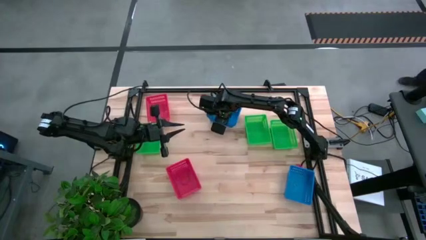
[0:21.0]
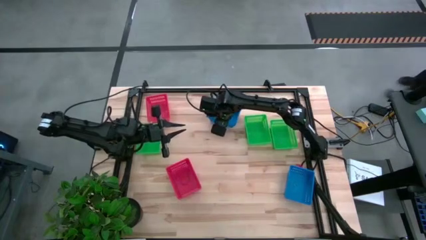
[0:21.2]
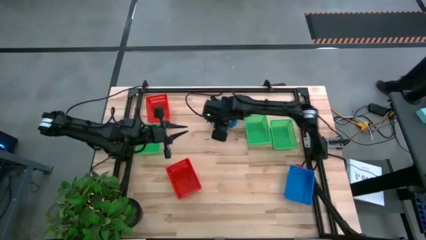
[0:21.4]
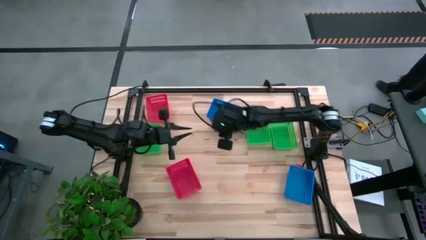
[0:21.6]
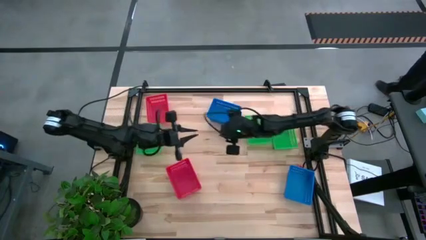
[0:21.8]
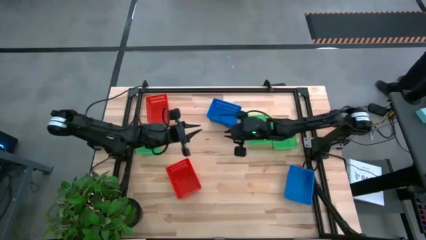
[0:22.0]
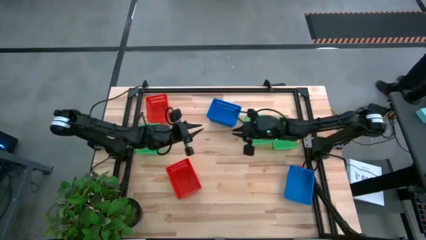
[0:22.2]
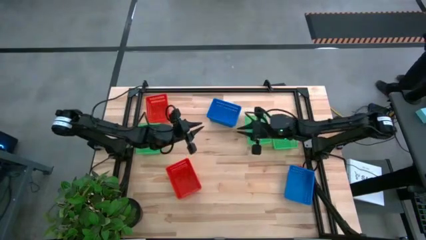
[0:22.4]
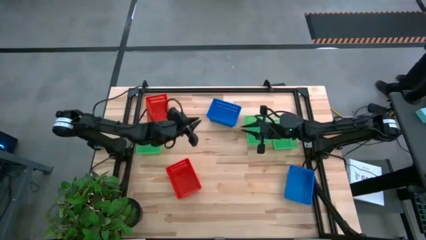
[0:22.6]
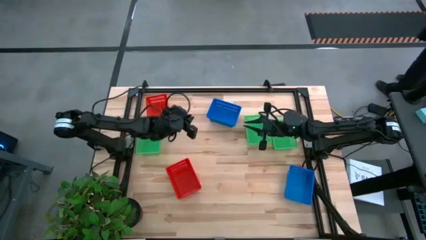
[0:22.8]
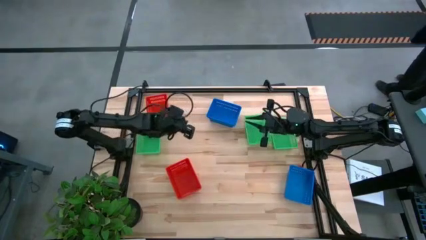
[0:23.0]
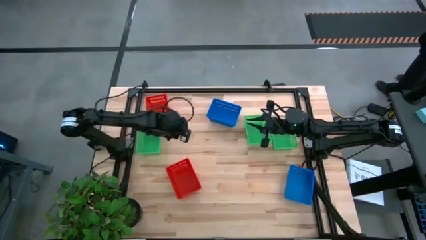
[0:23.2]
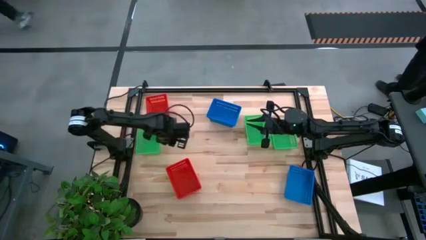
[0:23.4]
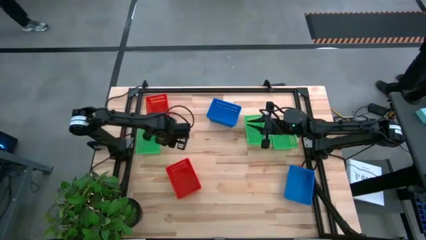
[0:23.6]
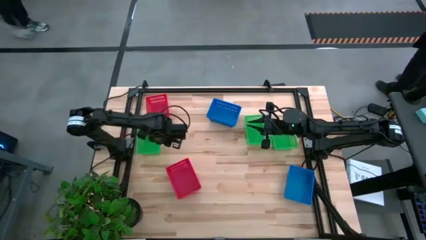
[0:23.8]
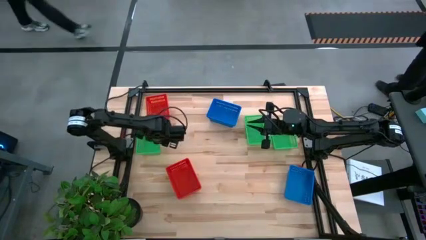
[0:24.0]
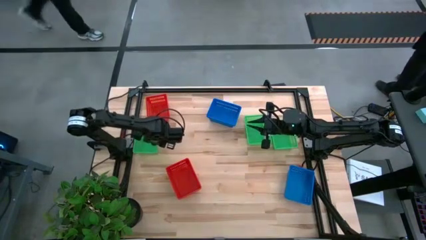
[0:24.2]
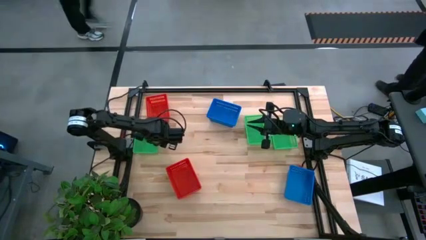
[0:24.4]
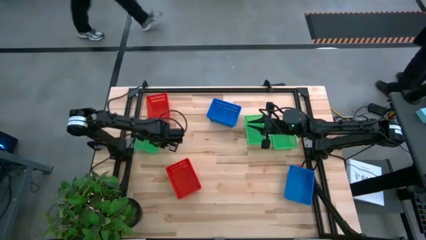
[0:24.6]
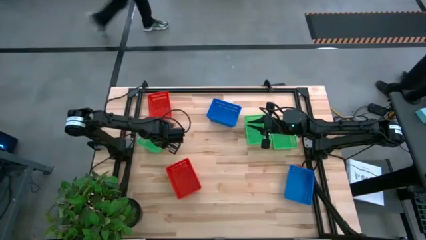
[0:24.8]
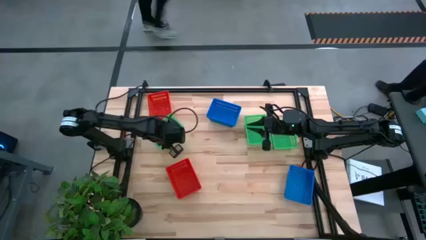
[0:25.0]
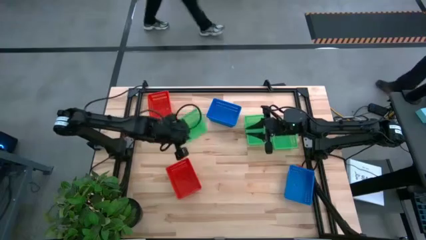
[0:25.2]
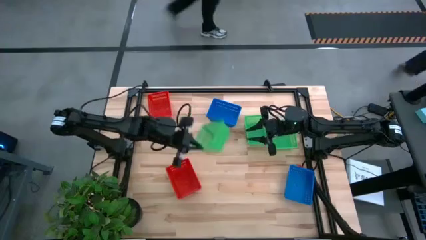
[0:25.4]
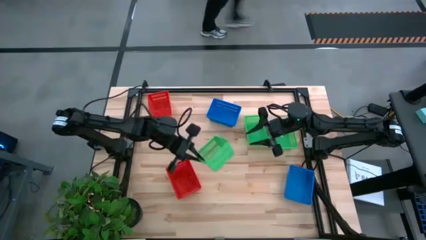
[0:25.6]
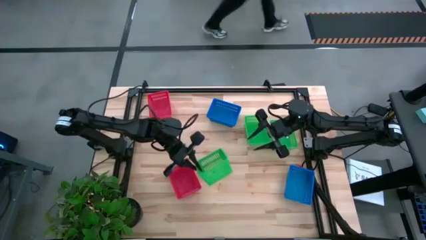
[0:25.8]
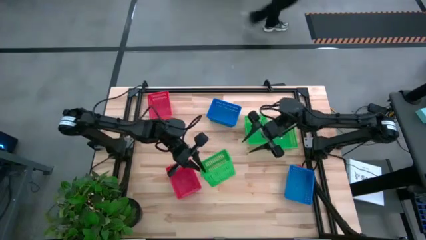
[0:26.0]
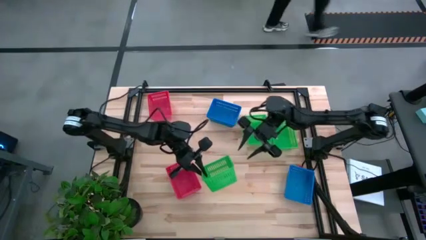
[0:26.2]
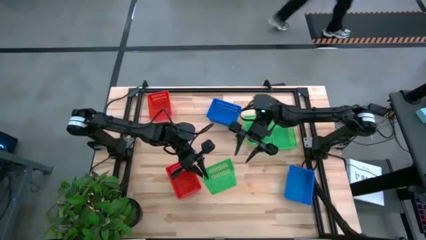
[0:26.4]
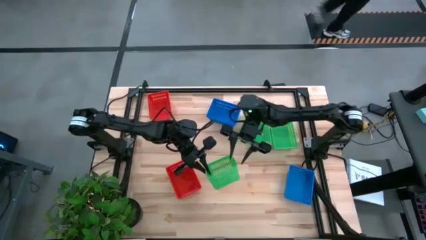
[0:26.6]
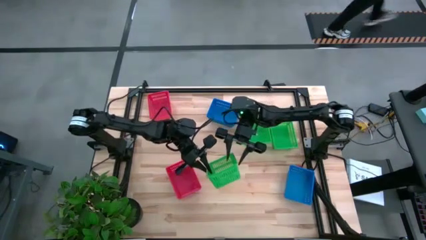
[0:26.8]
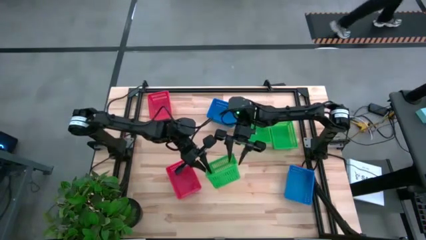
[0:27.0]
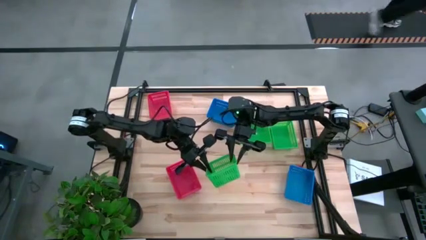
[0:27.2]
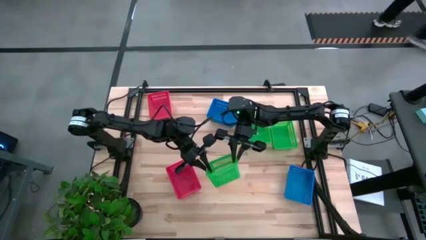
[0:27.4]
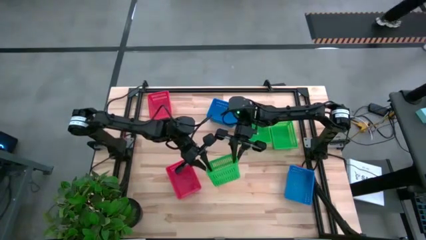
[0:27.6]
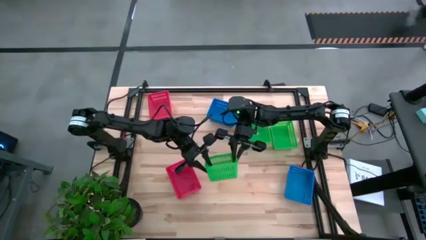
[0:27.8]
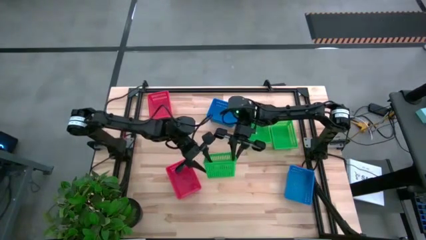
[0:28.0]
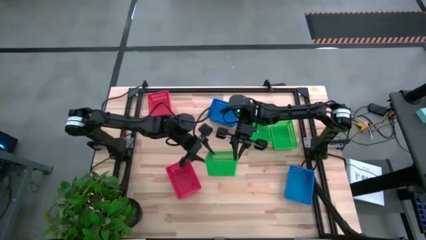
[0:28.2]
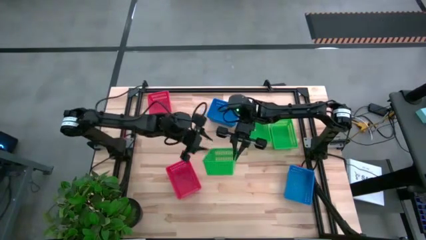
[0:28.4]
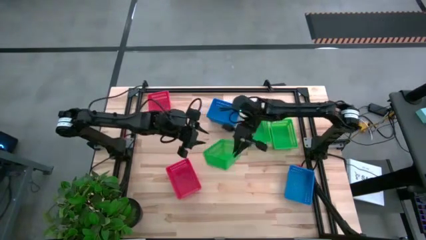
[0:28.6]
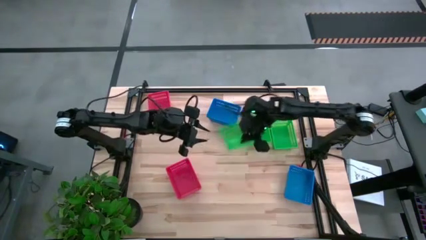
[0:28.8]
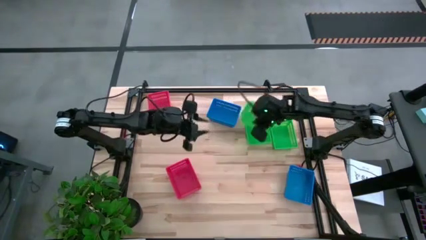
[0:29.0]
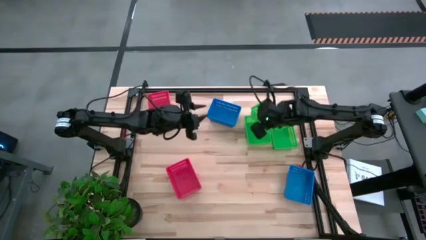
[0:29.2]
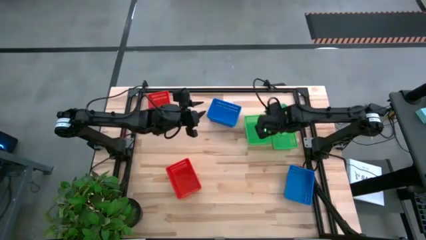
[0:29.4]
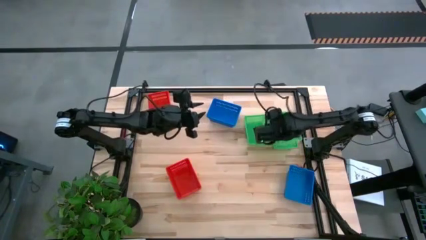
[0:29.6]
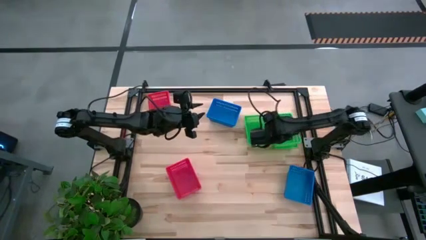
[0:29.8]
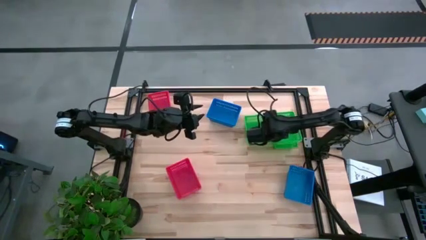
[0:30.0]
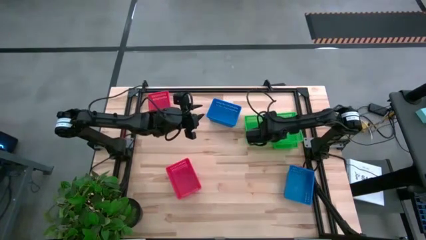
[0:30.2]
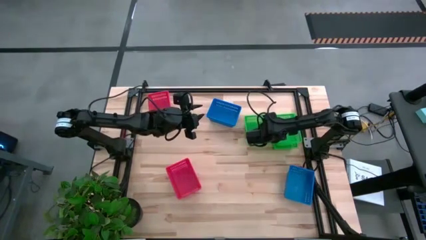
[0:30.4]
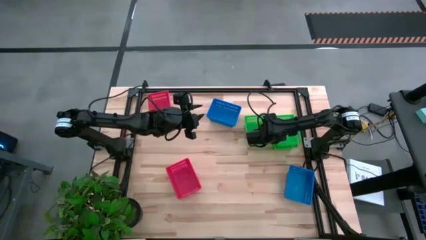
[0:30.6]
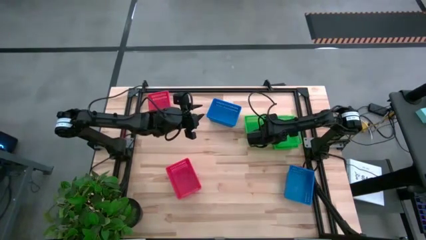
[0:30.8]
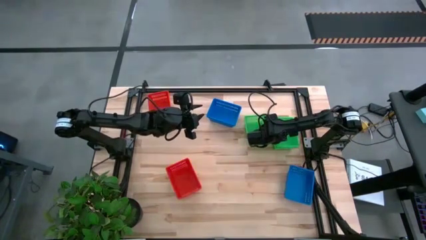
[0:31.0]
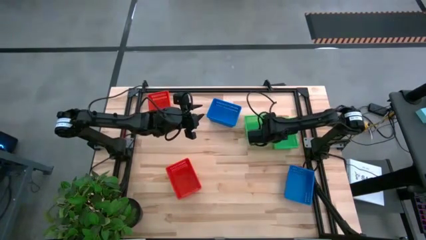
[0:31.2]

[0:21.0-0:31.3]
Stack the left green bin on top of the right green bin

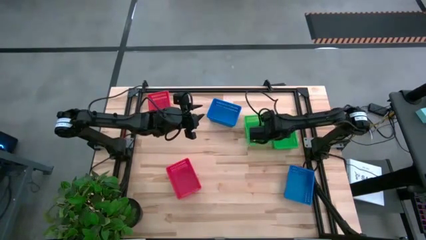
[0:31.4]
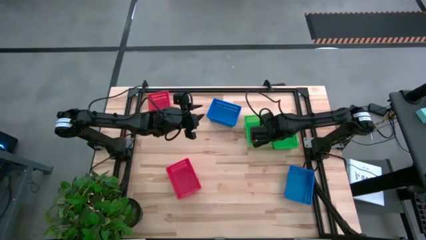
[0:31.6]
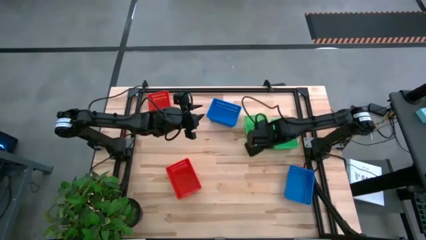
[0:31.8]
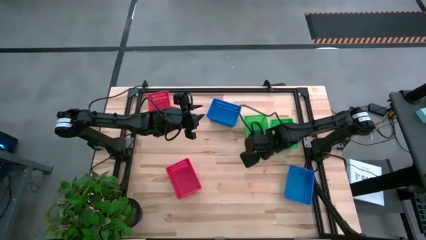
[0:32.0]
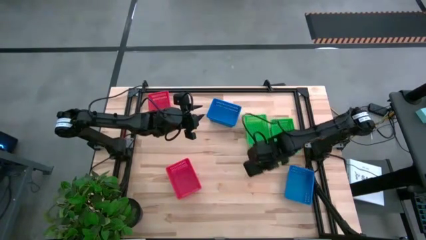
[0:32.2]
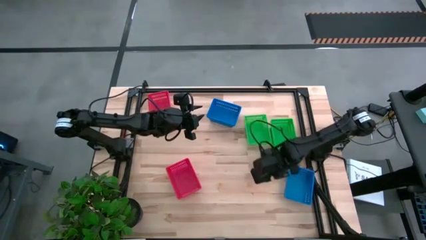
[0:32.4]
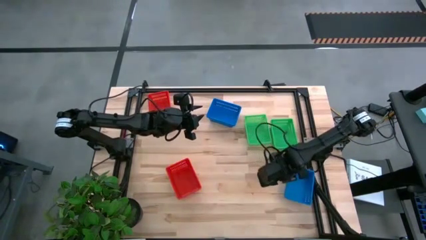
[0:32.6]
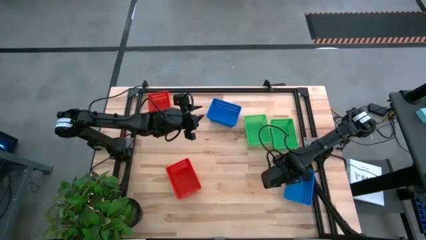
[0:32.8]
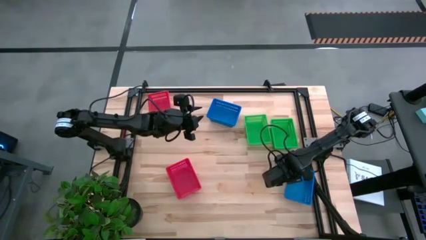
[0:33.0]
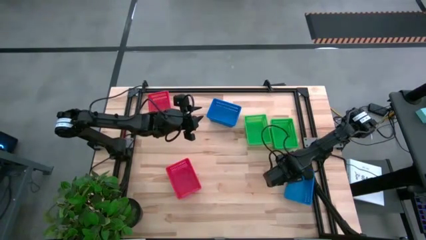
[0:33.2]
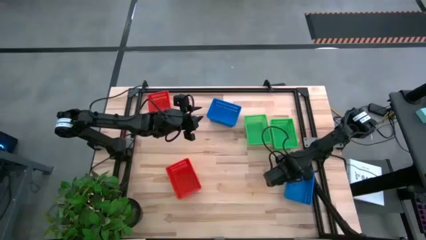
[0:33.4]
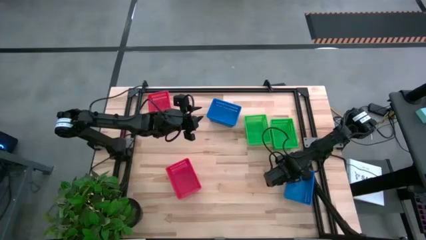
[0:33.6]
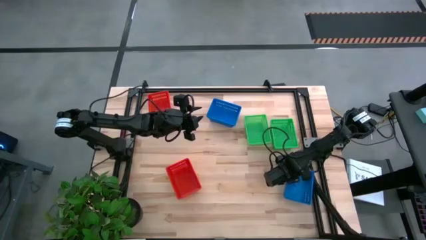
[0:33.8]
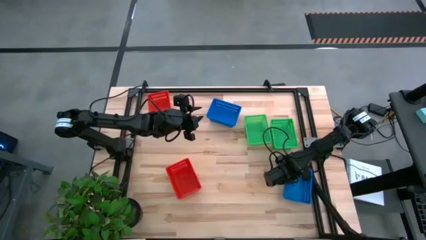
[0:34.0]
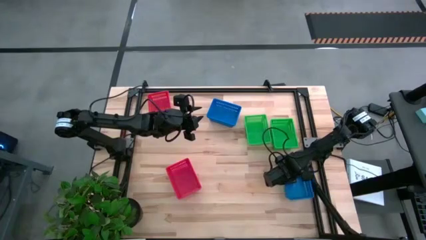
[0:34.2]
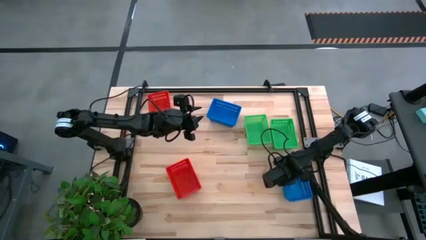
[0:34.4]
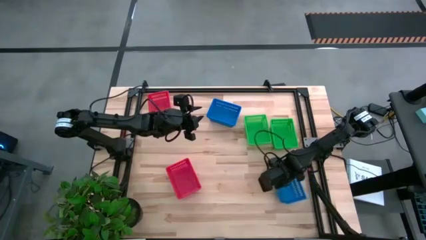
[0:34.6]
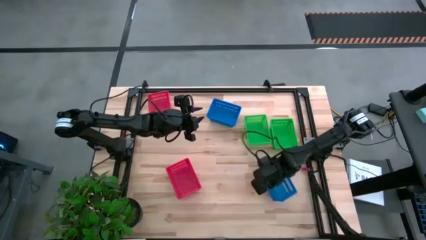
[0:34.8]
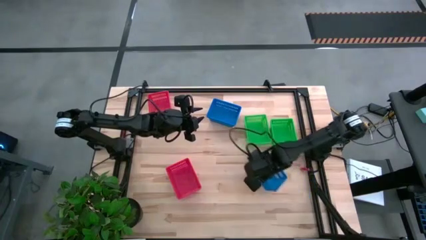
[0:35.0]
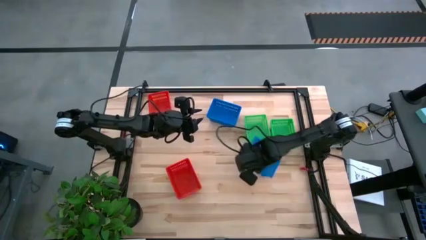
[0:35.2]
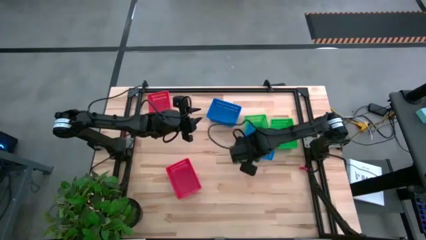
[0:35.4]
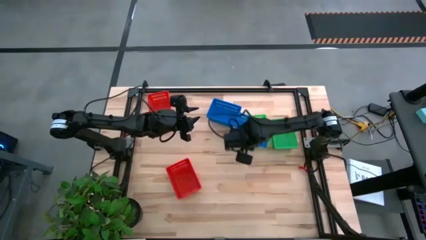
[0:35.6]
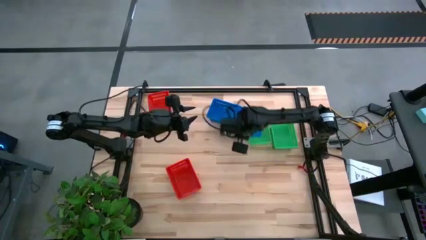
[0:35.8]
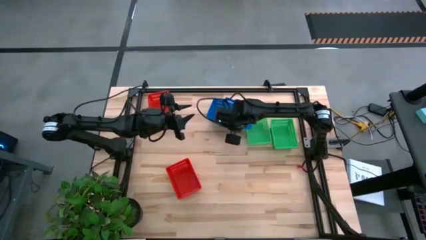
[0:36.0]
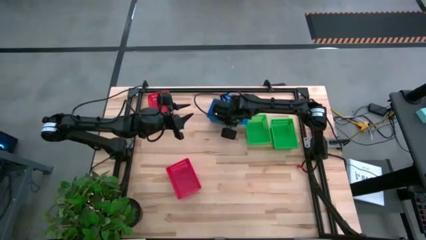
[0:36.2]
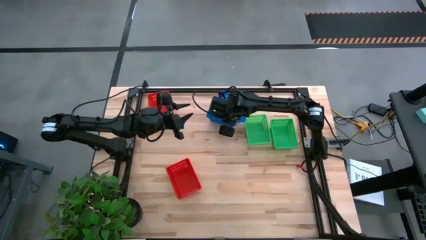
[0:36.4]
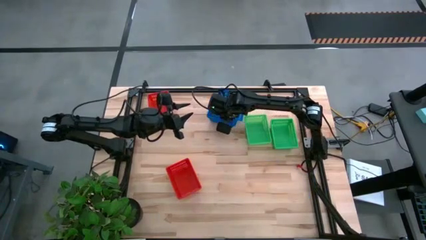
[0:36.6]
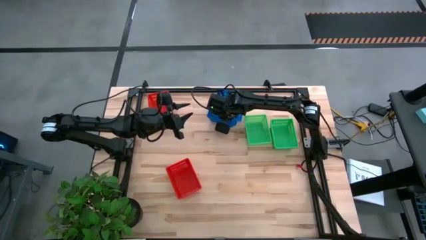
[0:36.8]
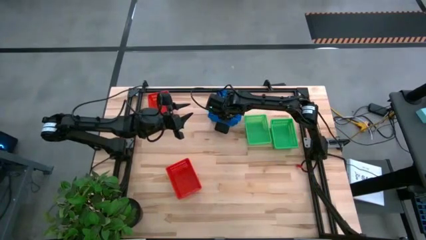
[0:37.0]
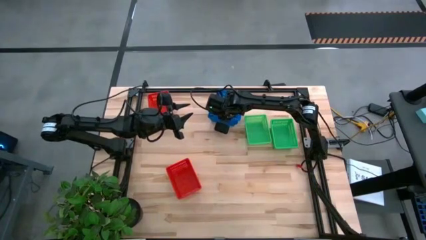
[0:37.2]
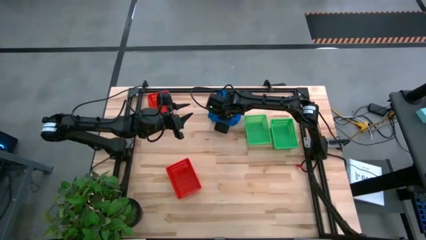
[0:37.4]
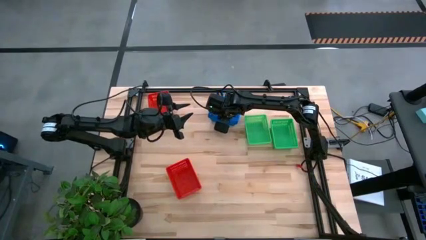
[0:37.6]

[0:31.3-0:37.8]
Stack the blue bin on top of the top blue bin
